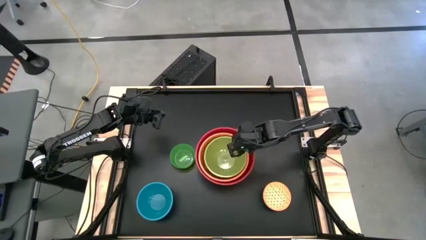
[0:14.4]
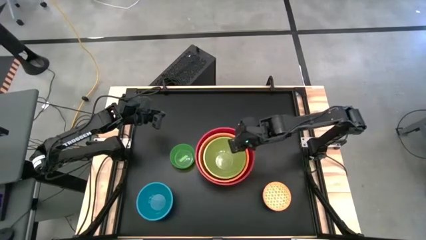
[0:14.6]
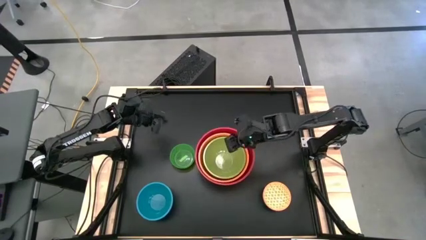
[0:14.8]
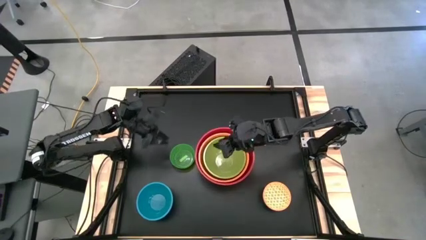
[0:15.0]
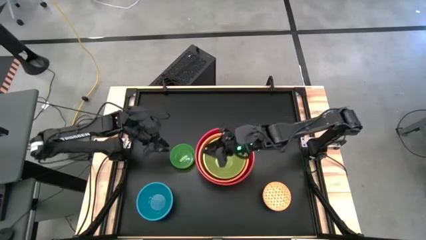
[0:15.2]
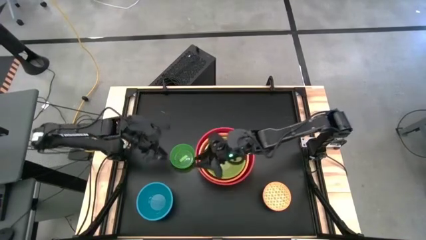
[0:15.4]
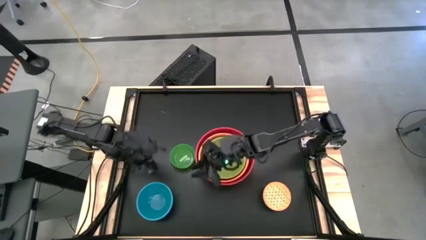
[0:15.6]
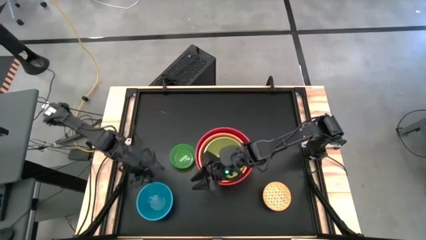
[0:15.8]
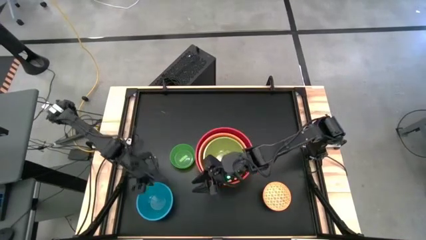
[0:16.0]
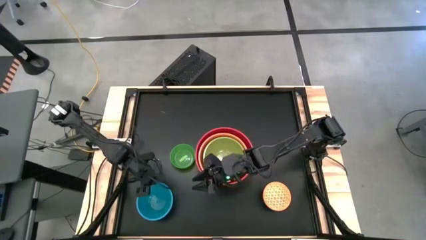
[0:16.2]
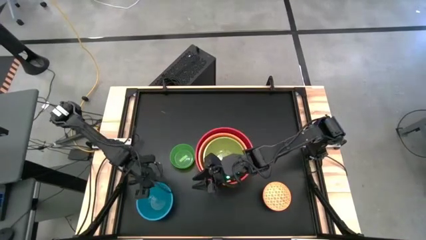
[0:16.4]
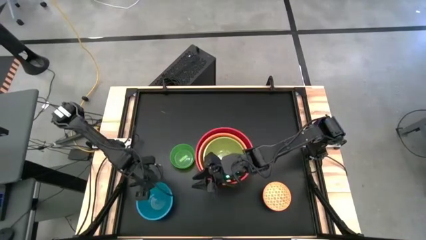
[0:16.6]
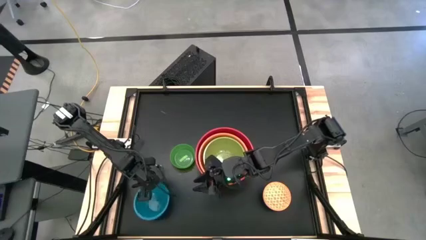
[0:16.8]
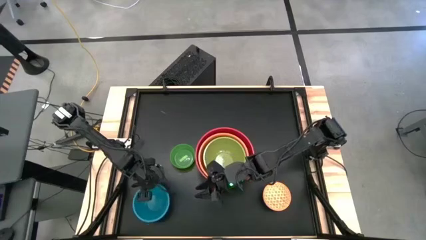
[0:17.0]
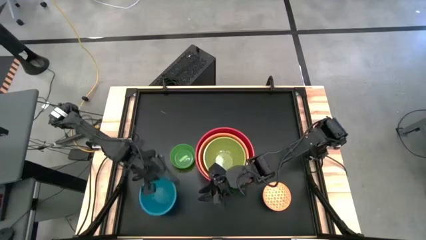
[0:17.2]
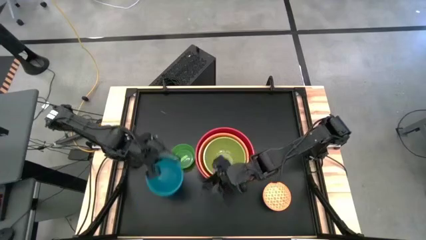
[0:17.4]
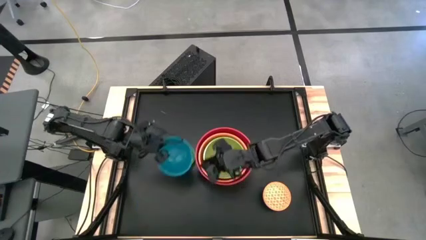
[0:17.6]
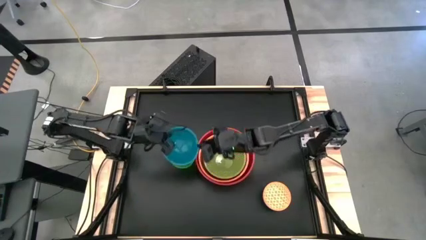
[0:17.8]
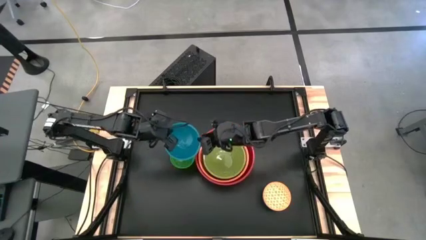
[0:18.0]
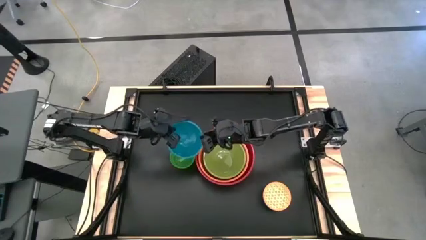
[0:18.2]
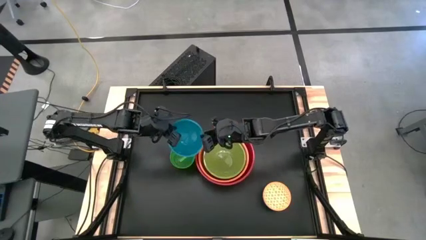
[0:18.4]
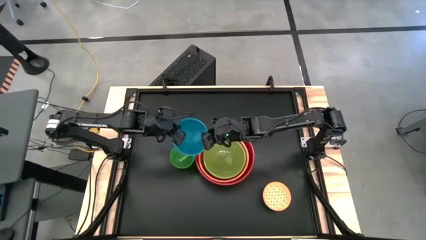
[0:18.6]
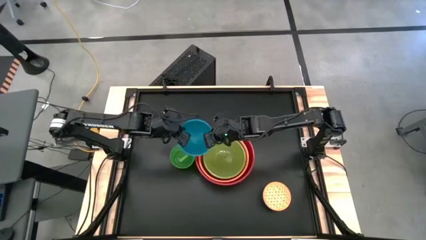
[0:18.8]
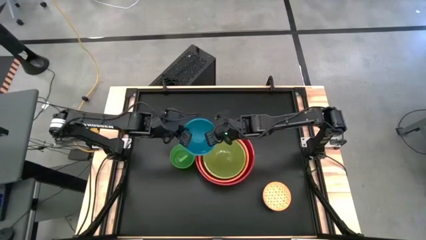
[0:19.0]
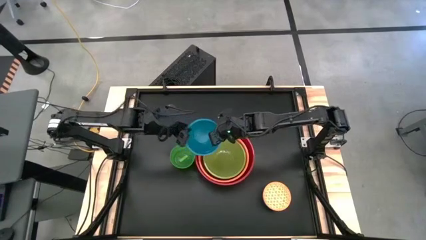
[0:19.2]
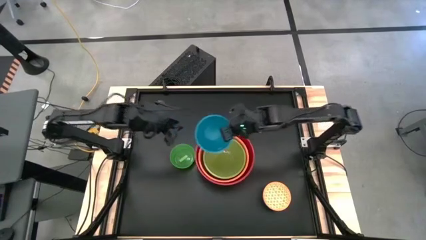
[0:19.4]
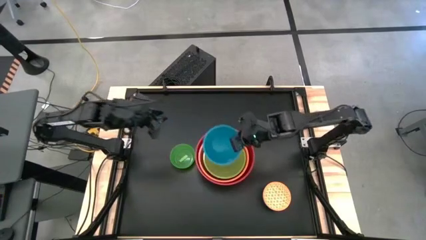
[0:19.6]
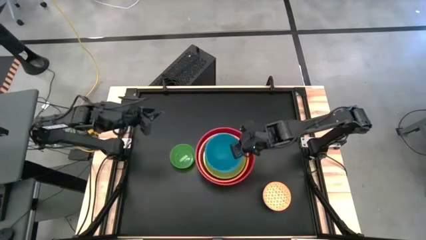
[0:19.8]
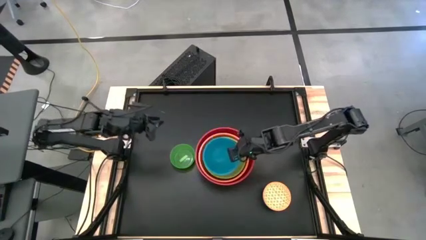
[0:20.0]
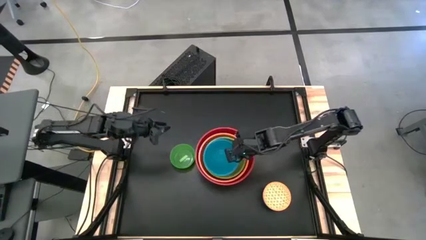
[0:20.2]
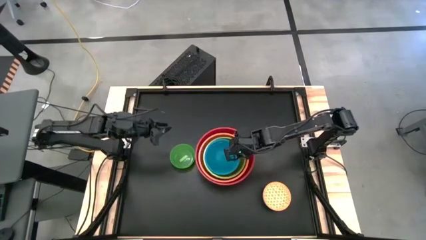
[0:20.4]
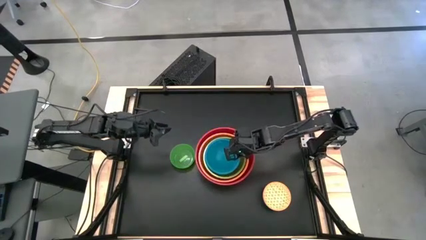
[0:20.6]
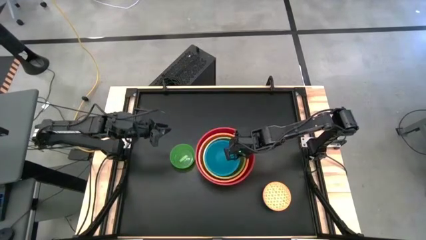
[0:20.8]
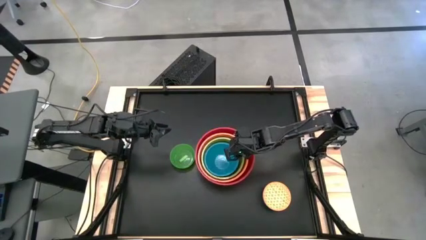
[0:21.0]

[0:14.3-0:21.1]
Stack the blue bowl on top of the light green bowl

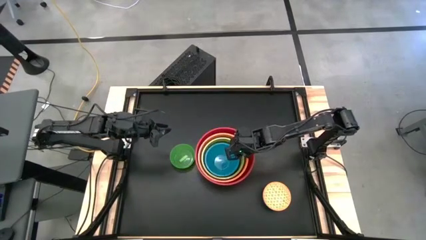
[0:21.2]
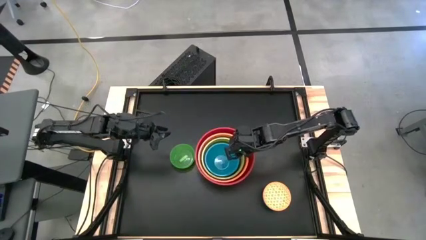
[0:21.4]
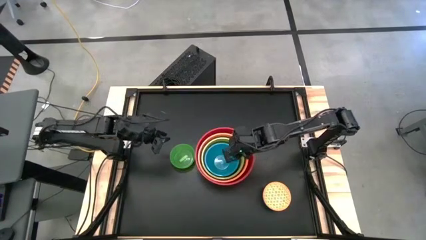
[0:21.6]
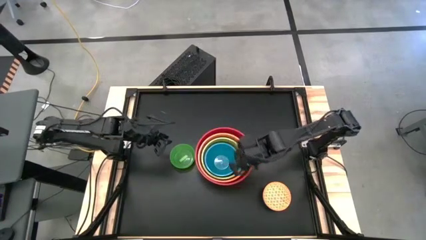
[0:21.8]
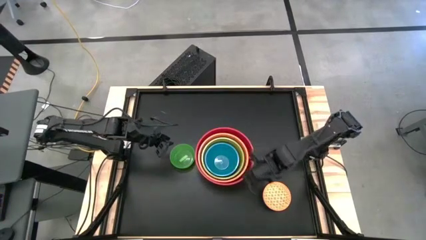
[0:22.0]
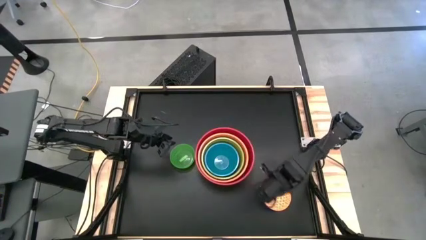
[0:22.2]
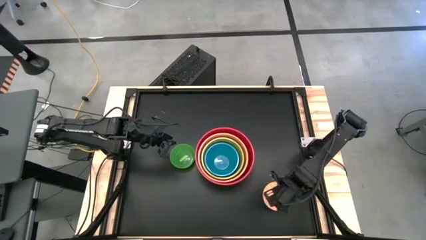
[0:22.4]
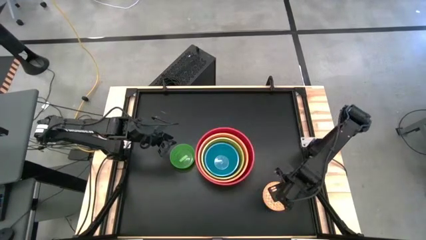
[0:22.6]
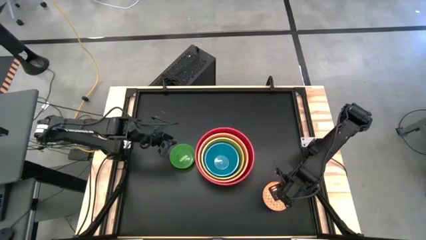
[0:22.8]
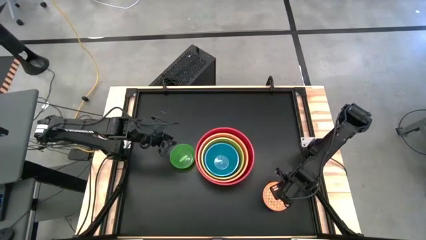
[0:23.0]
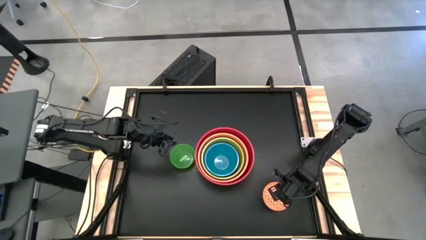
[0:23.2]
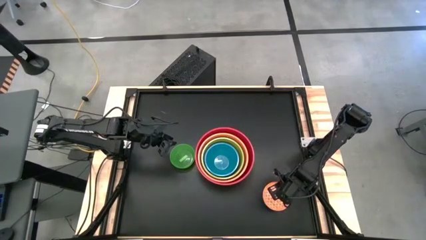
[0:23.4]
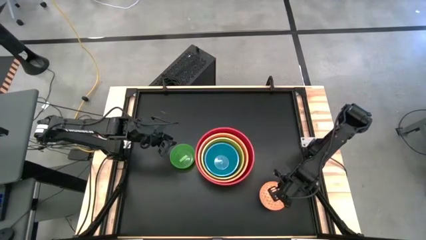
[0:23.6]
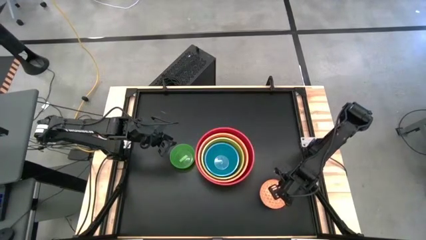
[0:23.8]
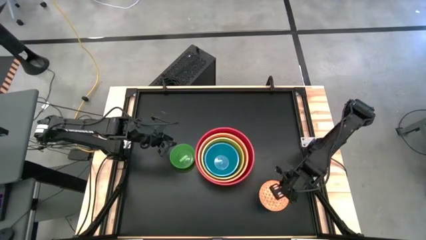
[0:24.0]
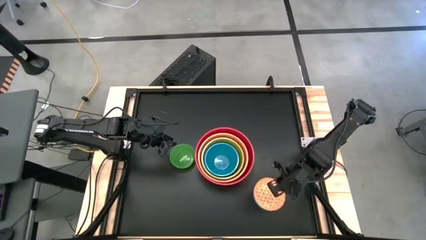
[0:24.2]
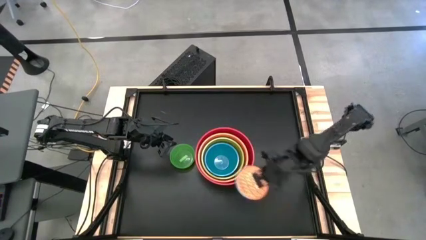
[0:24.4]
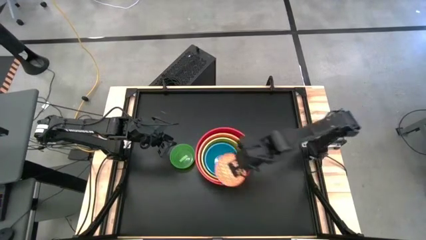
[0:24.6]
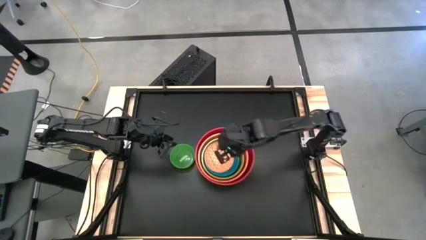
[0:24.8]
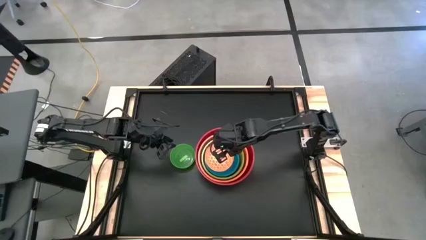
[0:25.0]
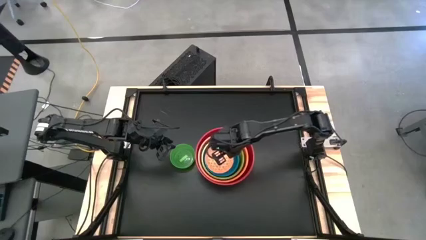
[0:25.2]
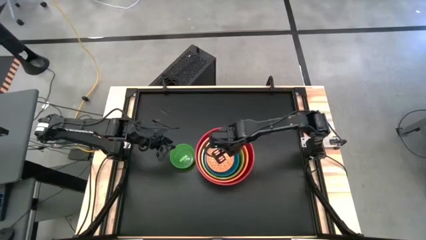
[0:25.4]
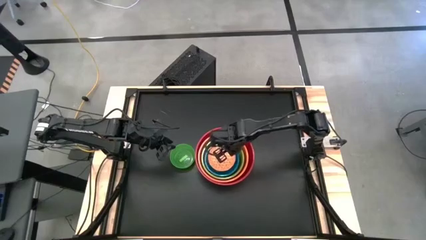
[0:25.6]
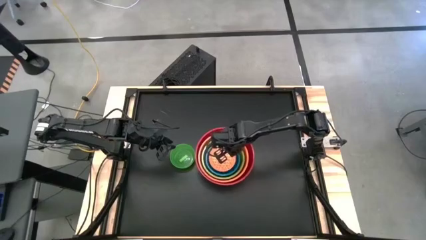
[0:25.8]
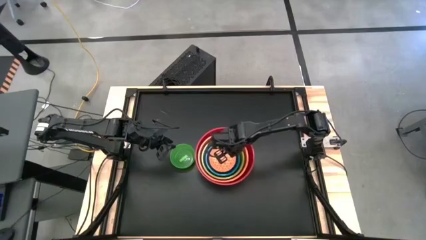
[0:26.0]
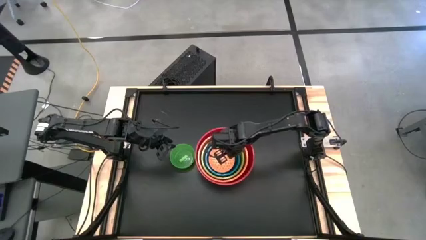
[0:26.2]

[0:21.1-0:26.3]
Stack the orange patterned bowl on top of the blue bowl

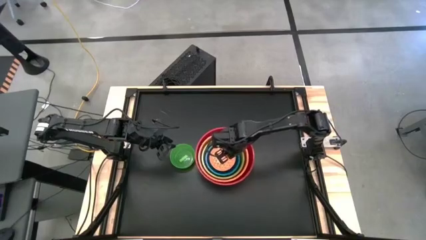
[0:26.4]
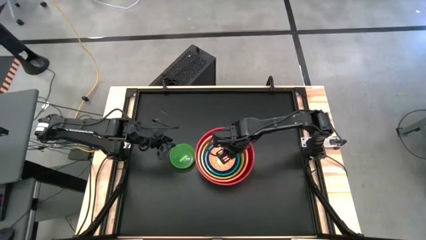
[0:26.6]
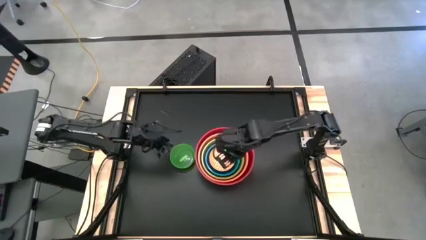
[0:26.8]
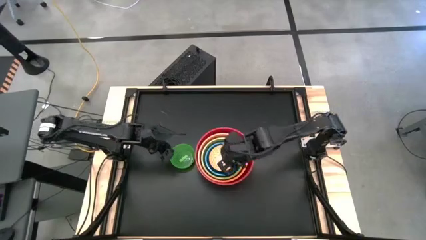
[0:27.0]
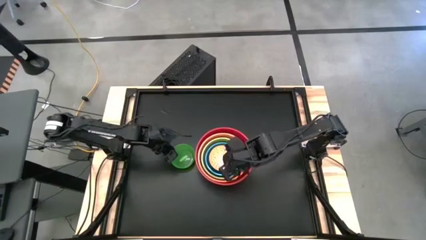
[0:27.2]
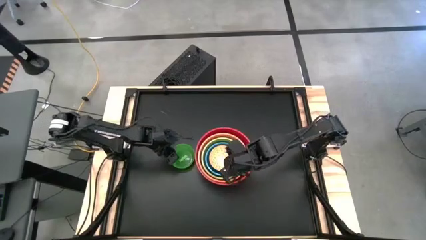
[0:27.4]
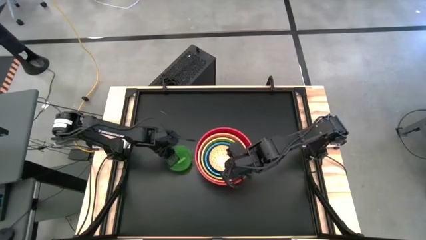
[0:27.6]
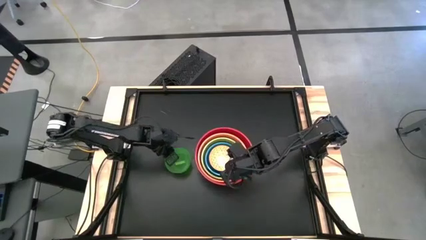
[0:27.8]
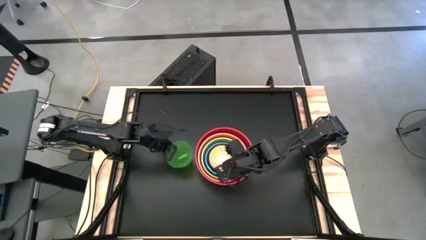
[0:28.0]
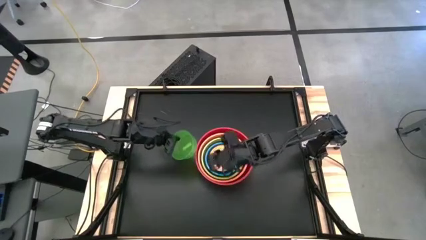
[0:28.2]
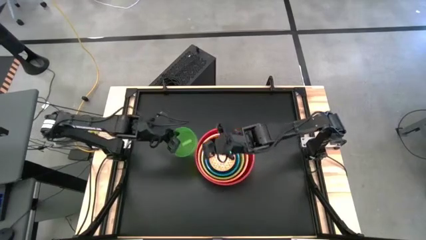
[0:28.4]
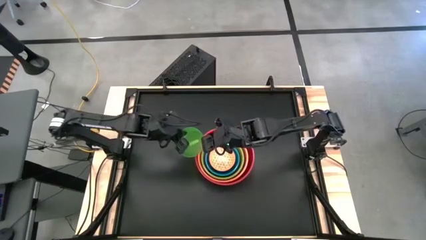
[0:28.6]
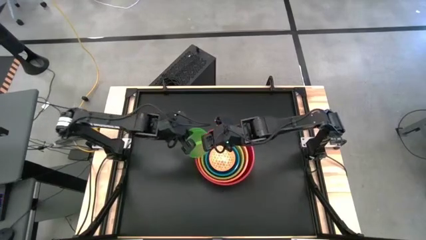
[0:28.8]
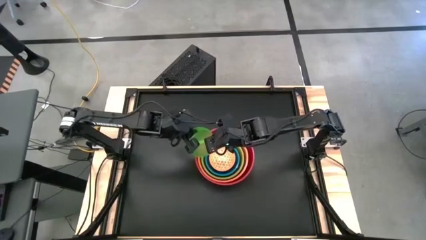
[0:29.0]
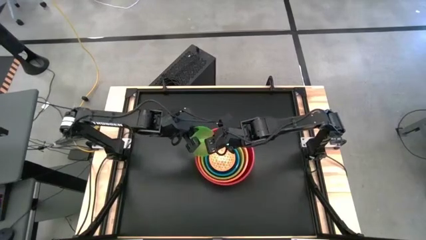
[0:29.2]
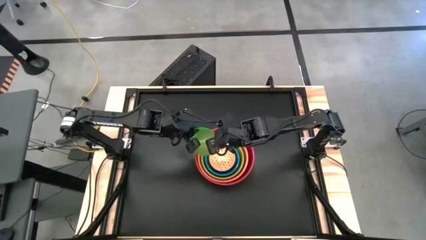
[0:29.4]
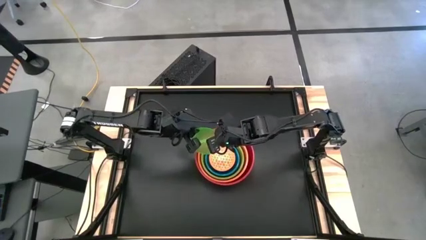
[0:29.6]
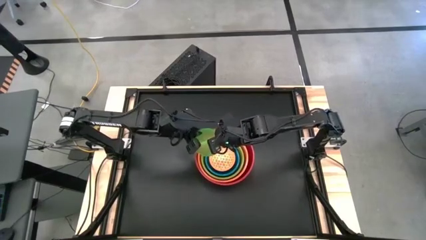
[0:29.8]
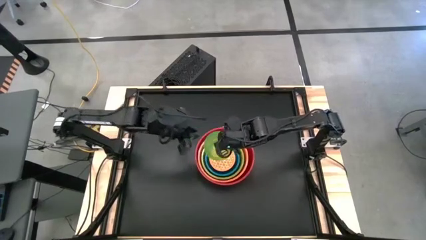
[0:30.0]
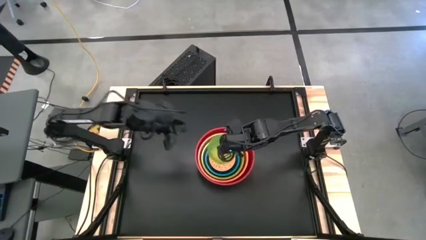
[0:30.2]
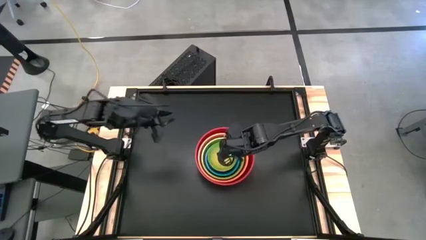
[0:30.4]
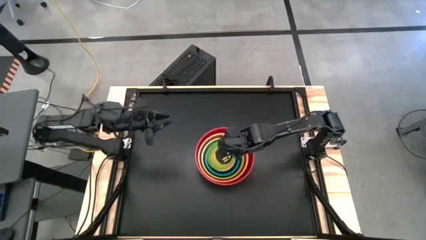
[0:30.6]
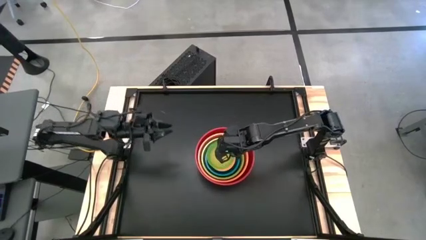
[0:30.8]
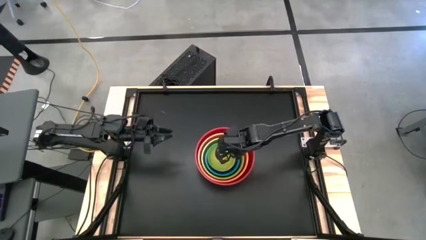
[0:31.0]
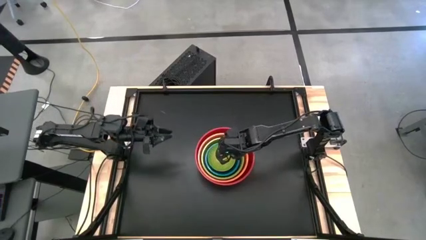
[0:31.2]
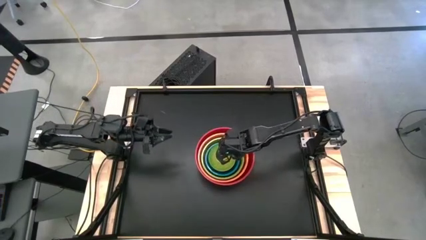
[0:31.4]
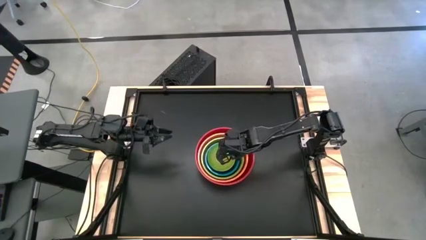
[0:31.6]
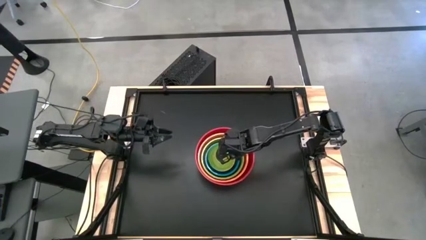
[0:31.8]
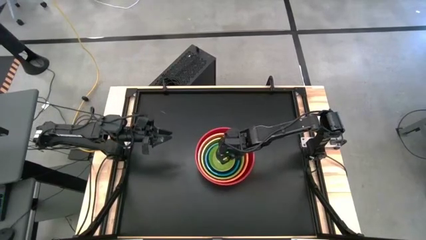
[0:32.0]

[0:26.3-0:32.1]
Stack the green bowl on top of the orange patterned bowl
